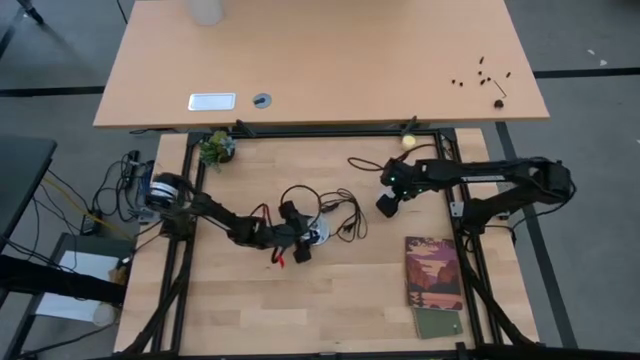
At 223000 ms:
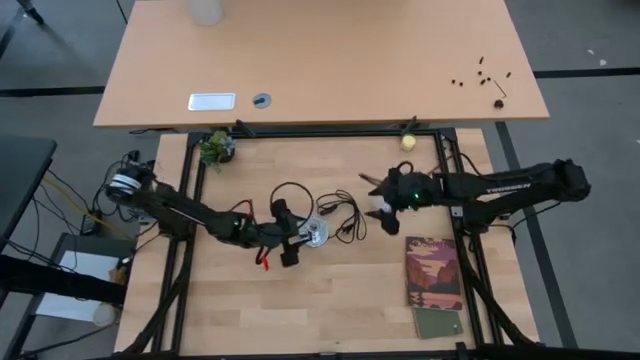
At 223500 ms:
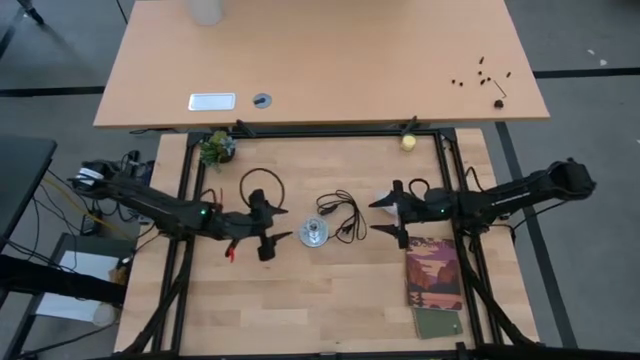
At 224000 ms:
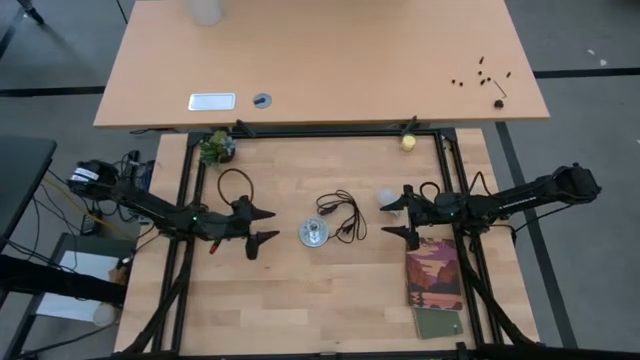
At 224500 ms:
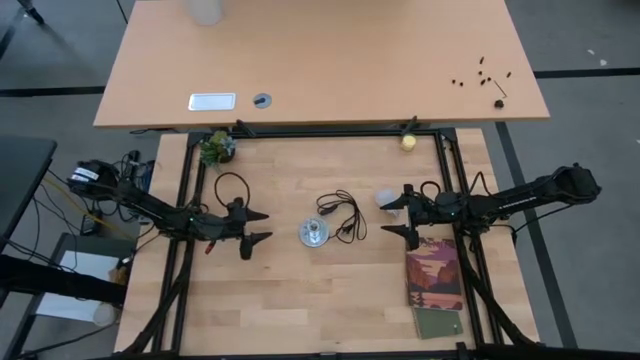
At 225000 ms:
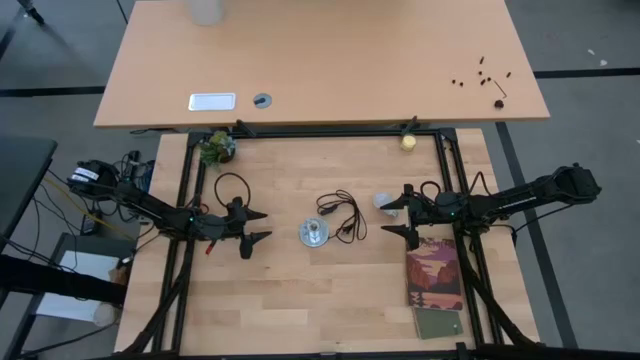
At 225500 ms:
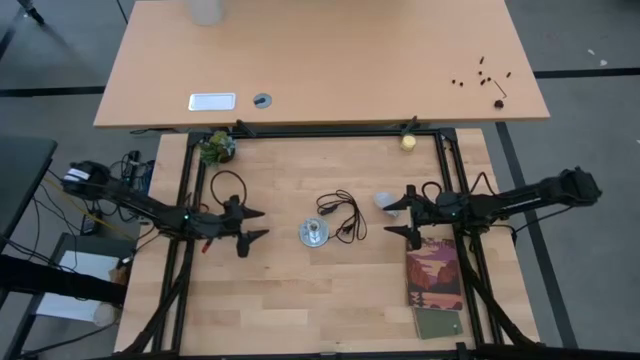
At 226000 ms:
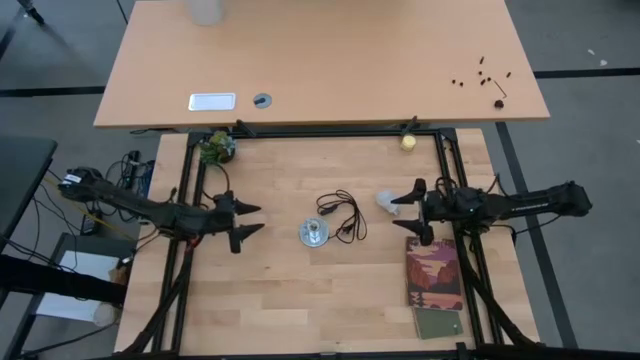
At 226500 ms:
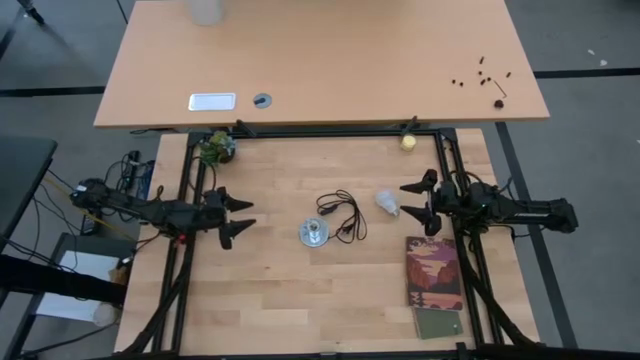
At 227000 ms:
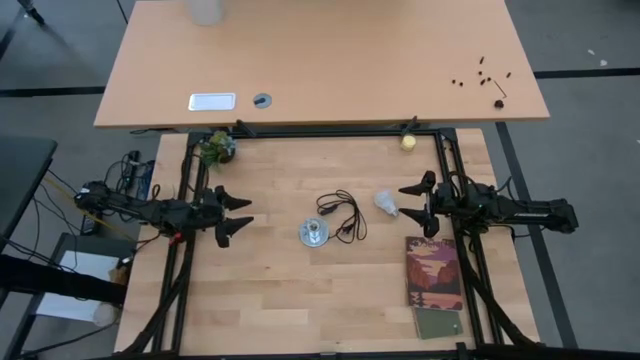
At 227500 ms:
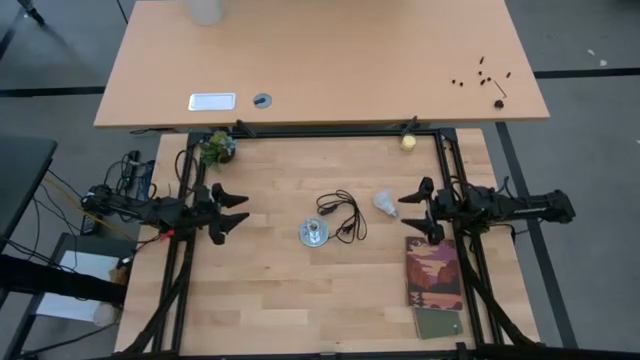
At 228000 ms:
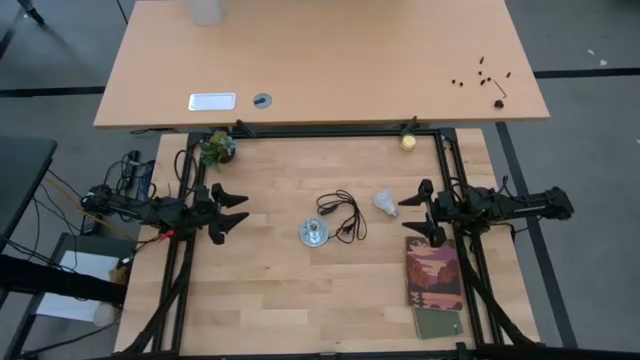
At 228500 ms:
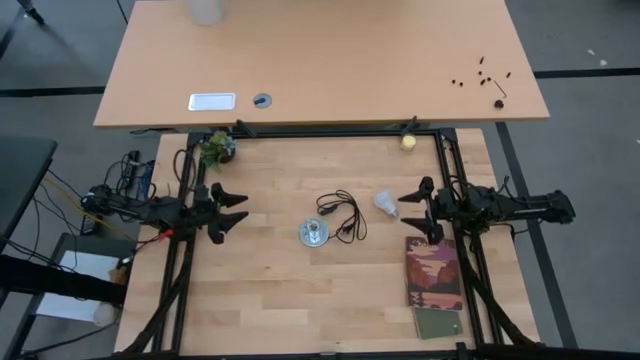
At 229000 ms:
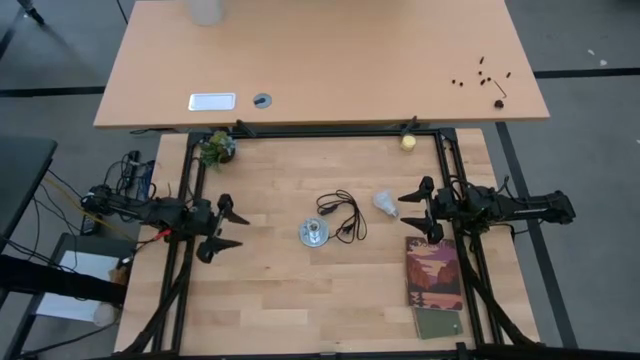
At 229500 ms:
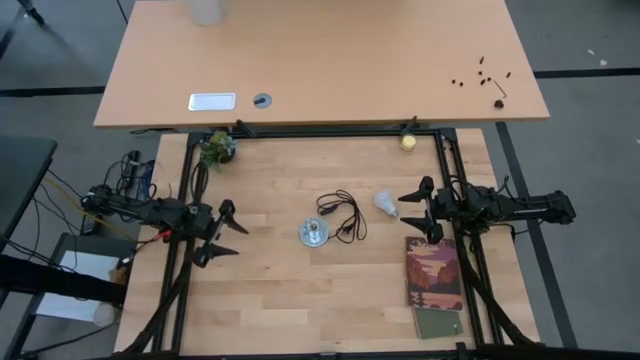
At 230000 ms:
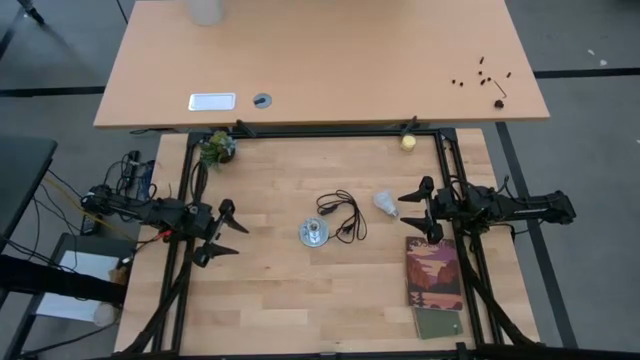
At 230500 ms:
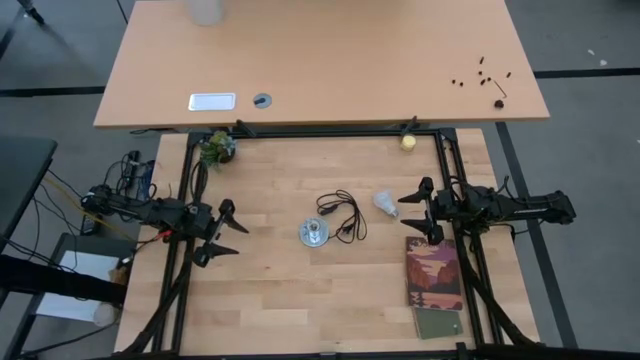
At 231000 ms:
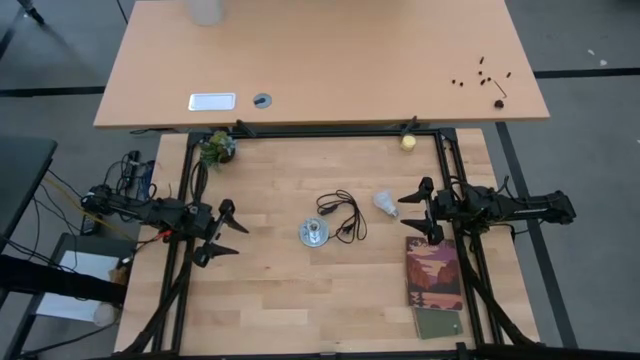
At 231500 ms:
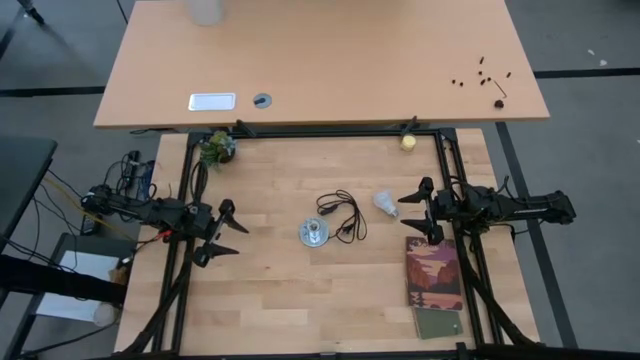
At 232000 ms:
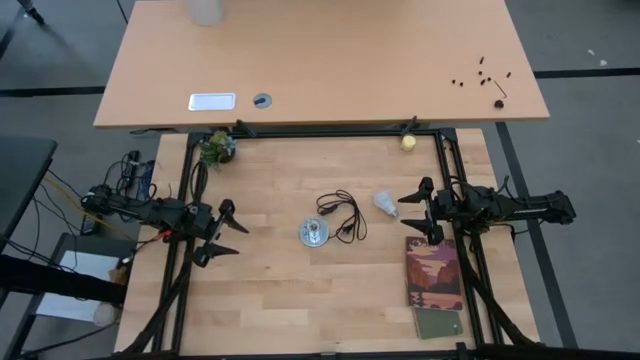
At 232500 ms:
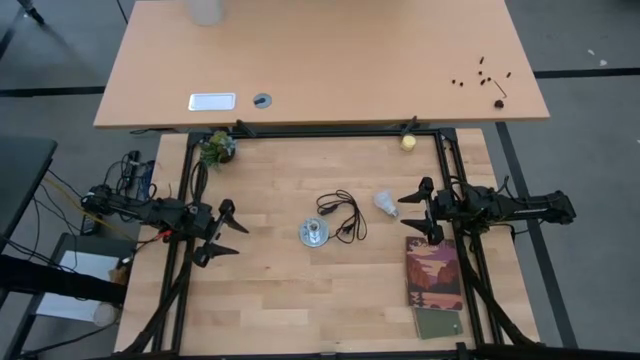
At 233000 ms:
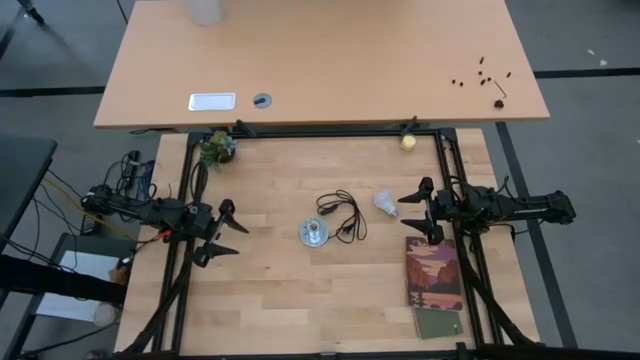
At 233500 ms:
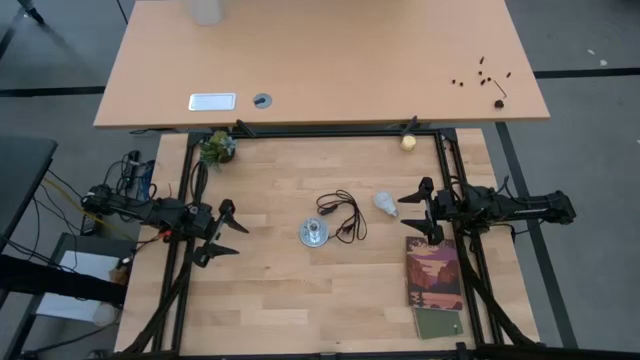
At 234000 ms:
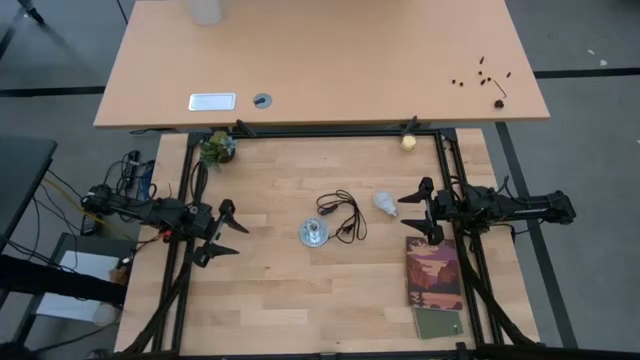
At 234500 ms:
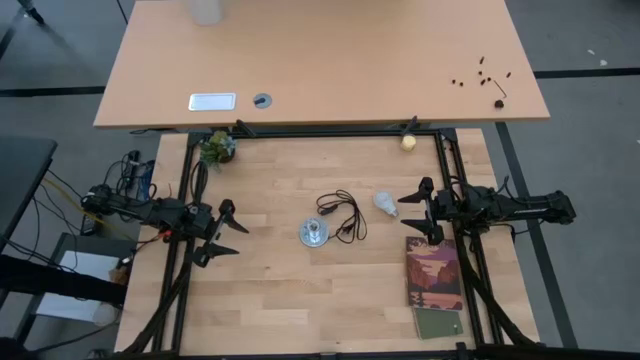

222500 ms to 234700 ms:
Task: Screw lightbulb
Return to Home Position

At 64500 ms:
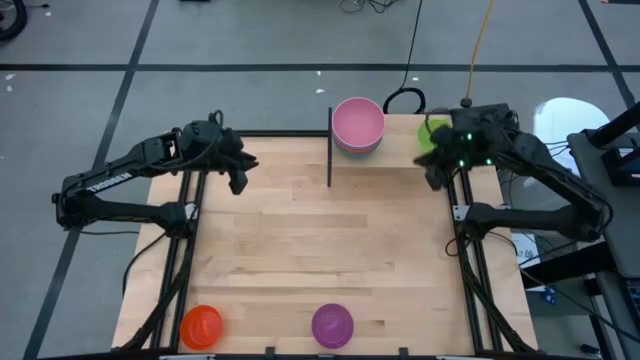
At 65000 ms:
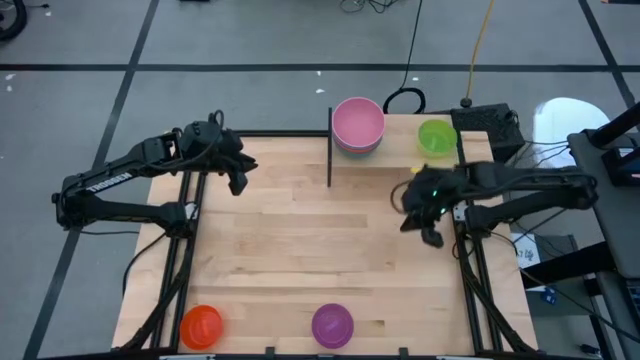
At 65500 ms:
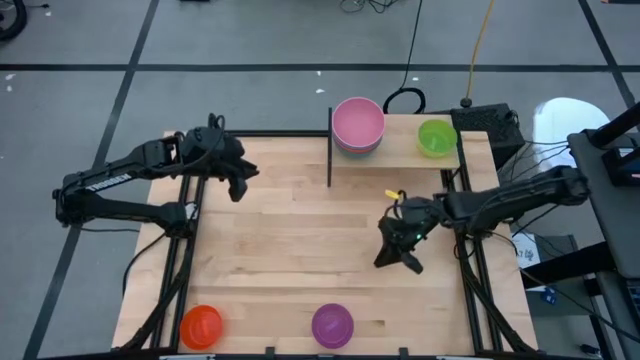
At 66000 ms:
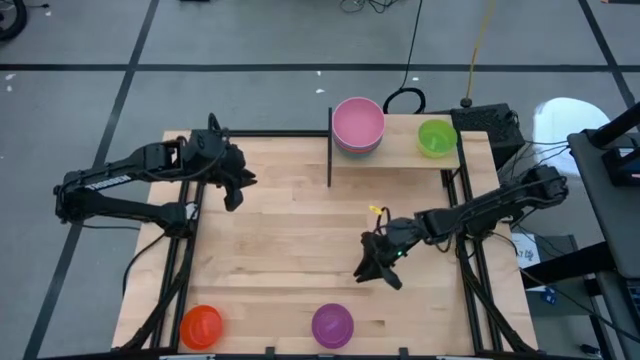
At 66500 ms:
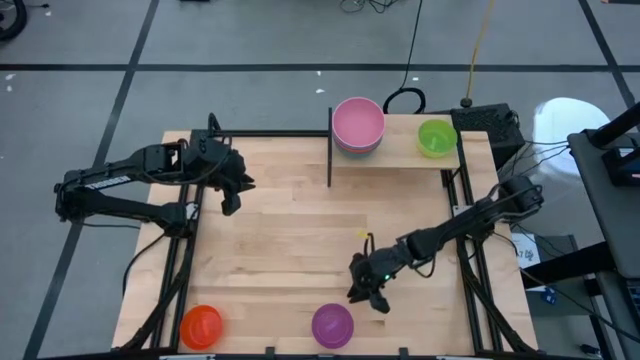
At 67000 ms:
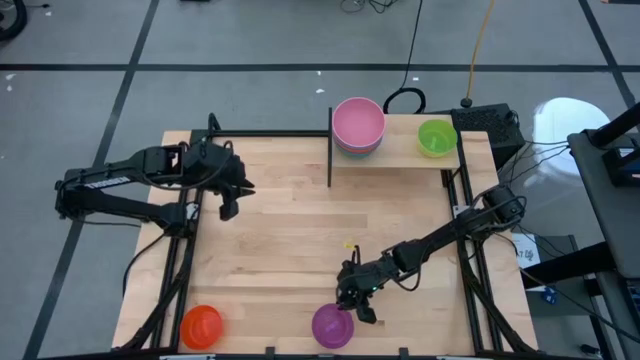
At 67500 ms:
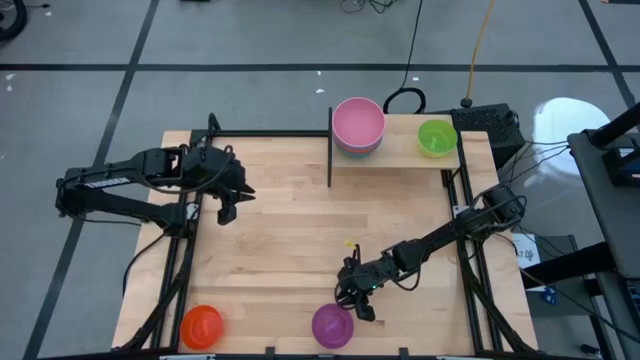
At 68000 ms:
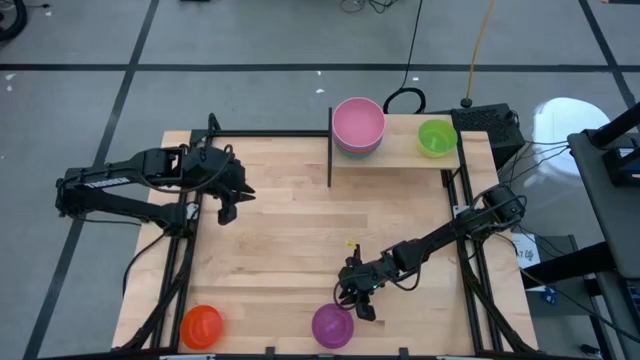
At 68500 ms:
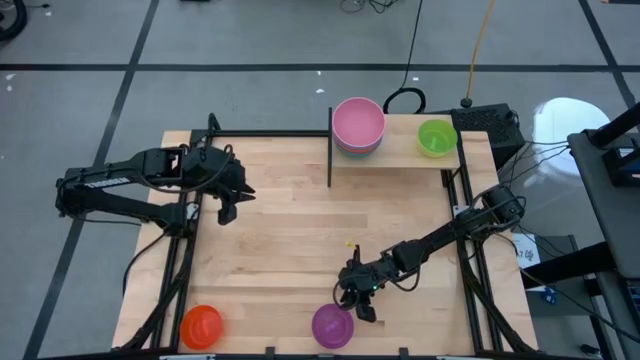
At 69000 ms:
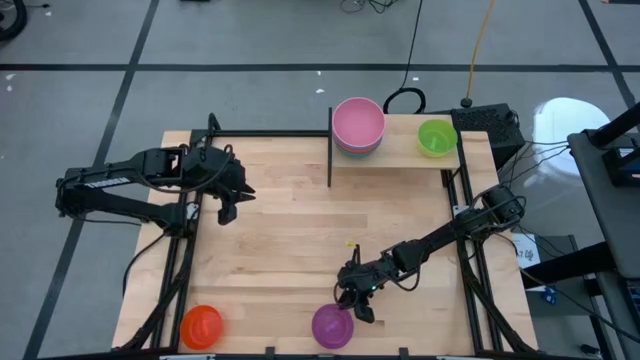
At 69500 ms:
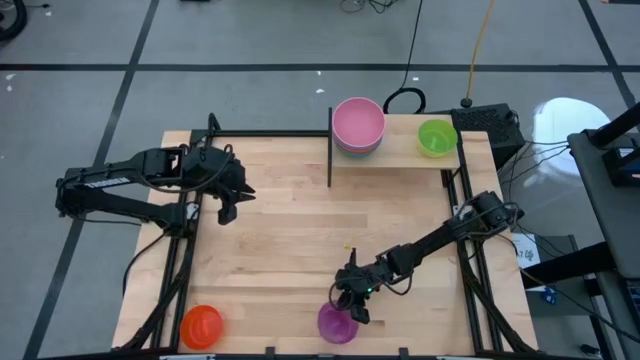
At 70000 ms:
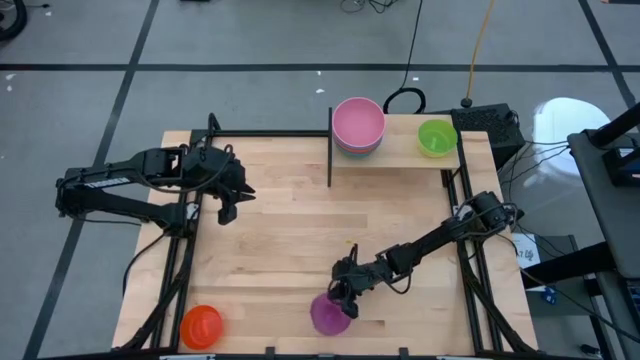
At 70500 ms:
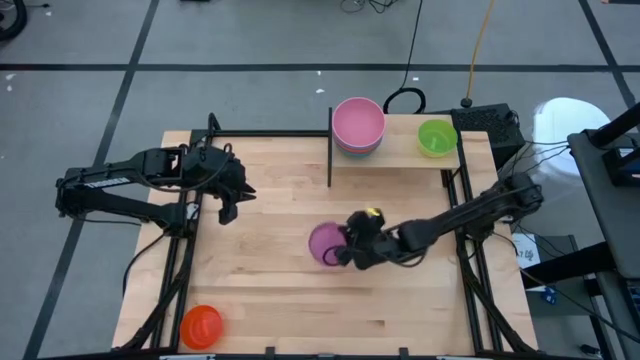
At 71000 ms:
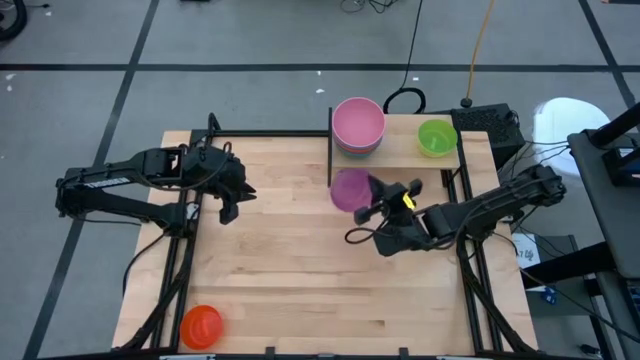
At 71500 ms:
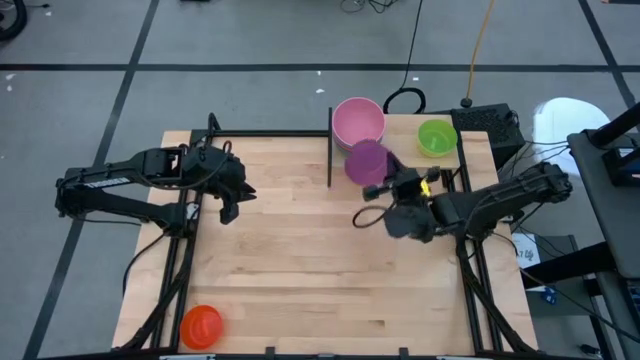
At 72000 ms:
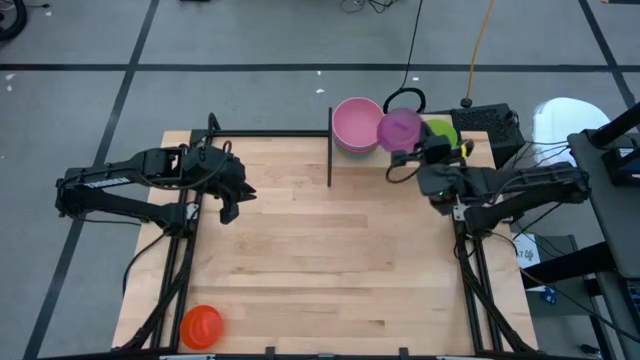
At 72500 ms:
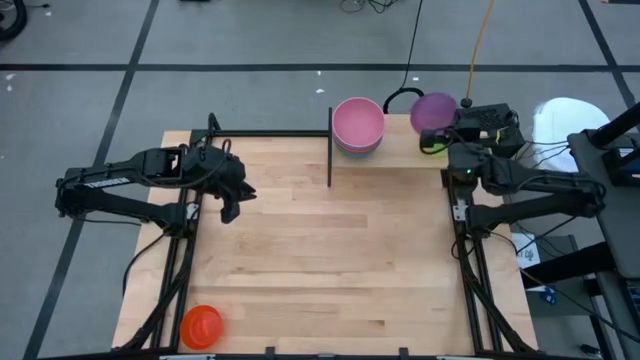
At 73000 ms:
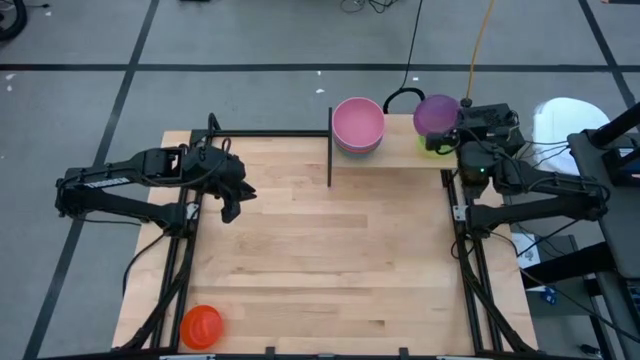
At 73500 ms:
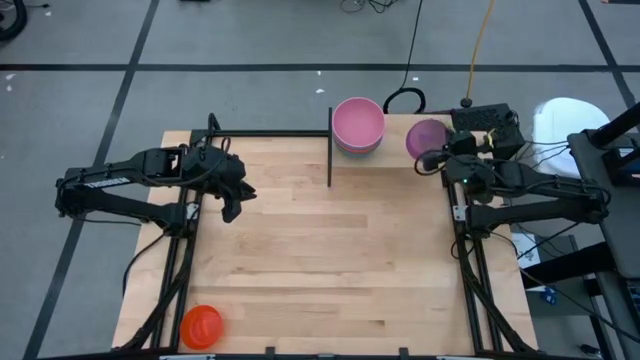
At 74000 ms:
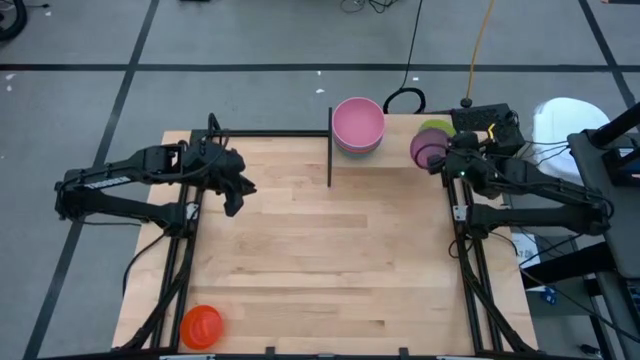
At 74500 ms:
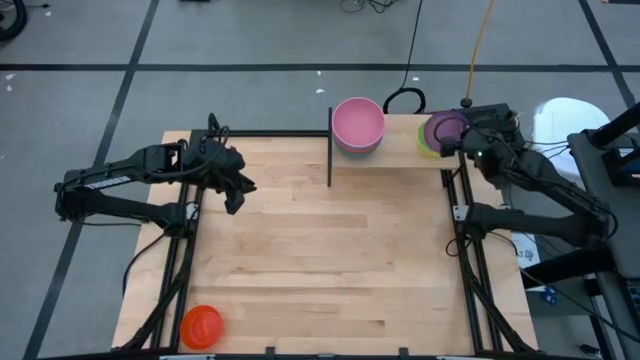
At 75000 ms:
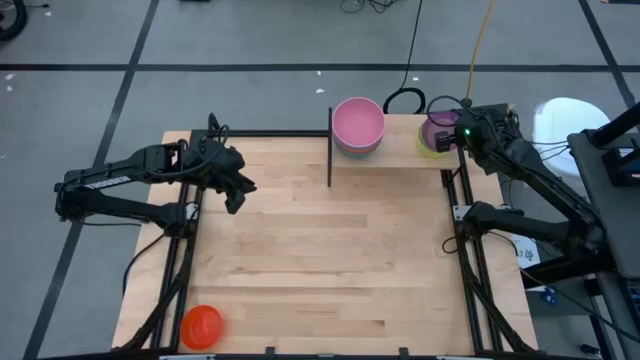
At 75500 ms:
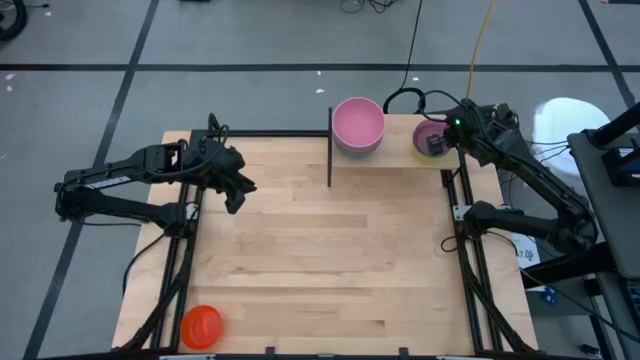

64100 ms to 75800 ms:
Task: Place and stack bowls onto a shelf
Stack the purple bowl on top of the green bowl on the shelf
